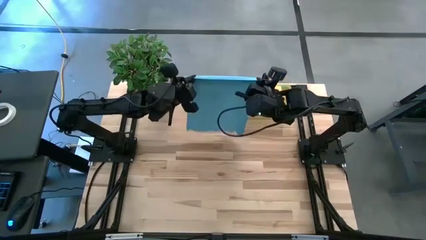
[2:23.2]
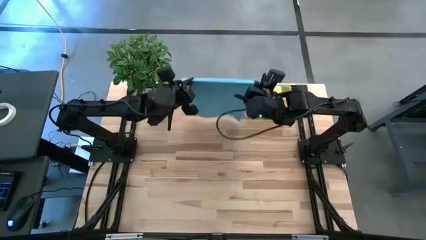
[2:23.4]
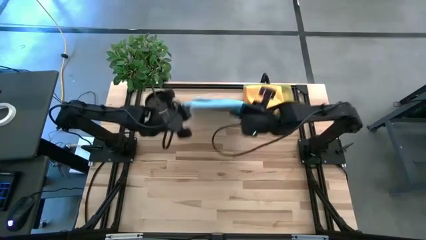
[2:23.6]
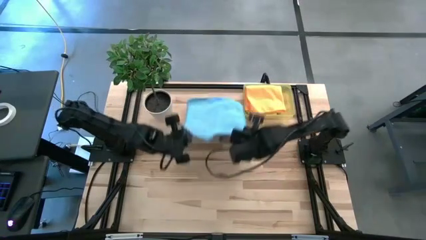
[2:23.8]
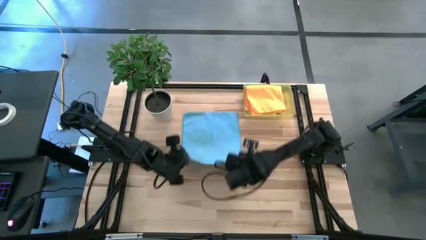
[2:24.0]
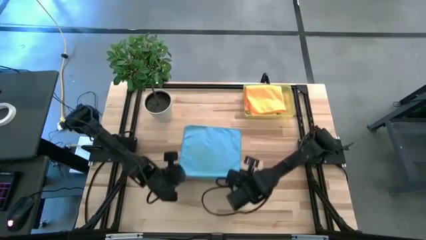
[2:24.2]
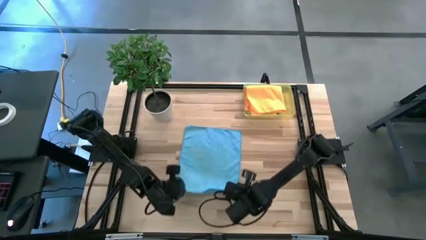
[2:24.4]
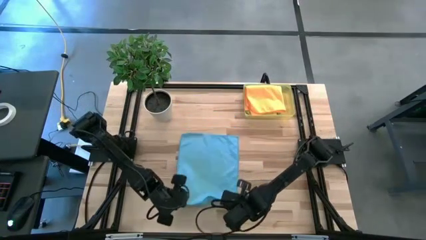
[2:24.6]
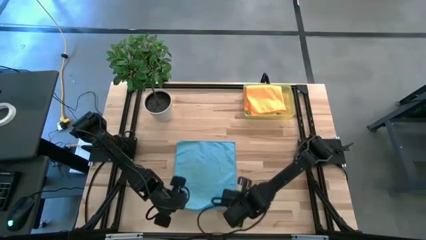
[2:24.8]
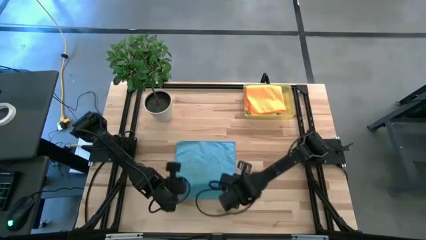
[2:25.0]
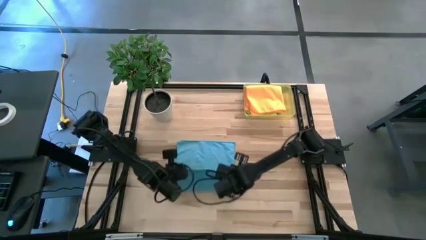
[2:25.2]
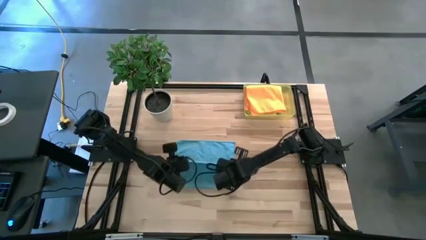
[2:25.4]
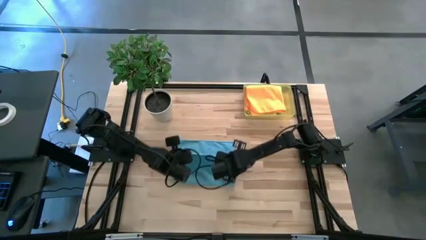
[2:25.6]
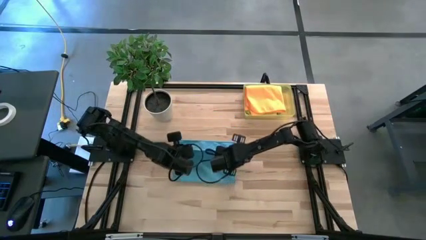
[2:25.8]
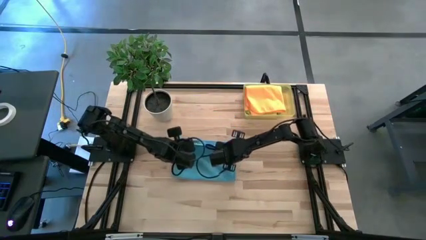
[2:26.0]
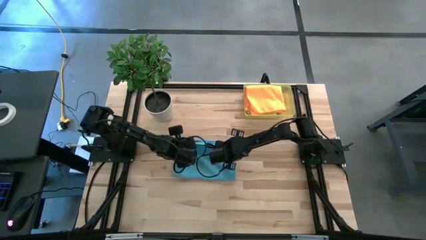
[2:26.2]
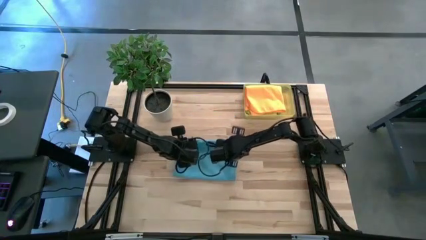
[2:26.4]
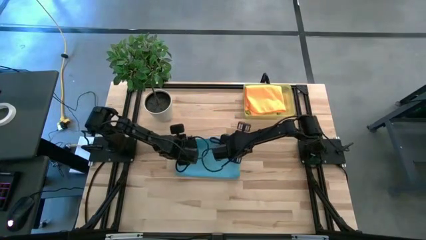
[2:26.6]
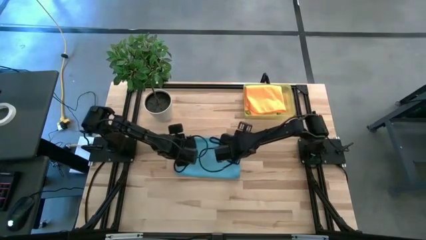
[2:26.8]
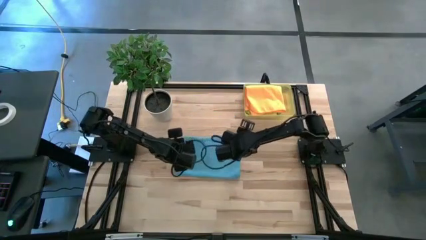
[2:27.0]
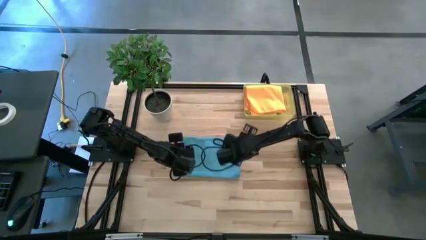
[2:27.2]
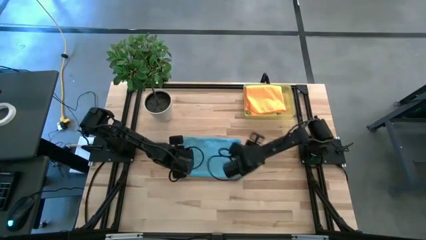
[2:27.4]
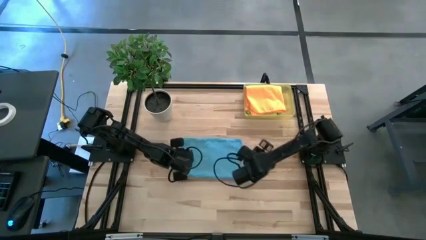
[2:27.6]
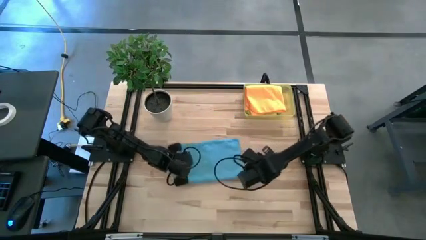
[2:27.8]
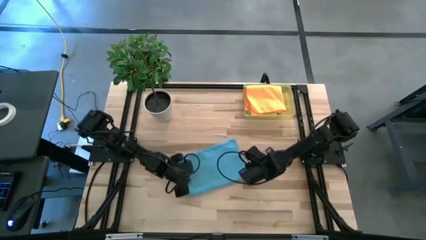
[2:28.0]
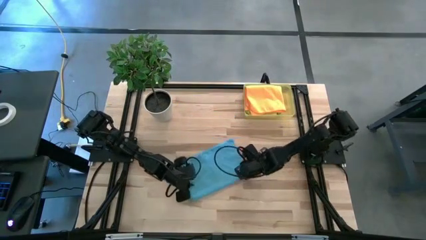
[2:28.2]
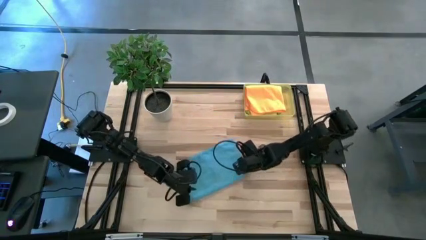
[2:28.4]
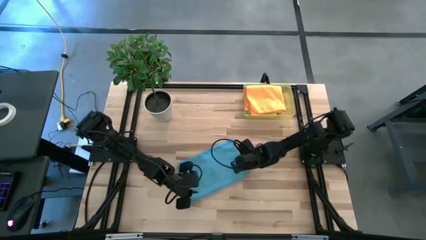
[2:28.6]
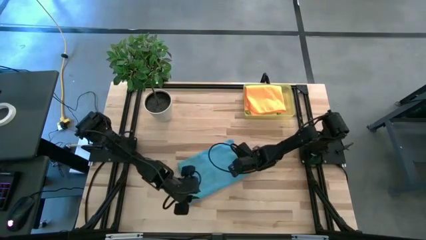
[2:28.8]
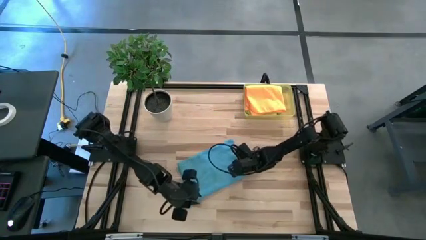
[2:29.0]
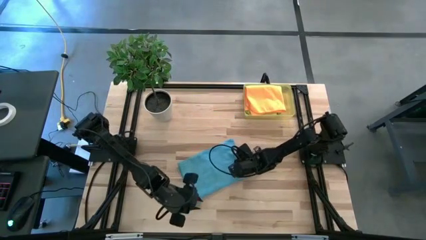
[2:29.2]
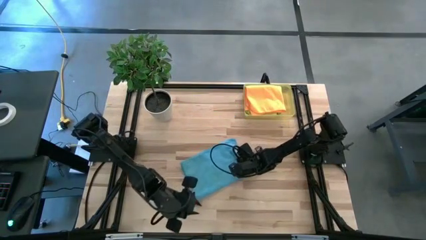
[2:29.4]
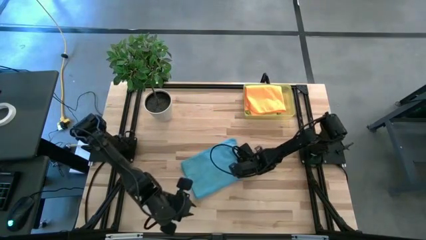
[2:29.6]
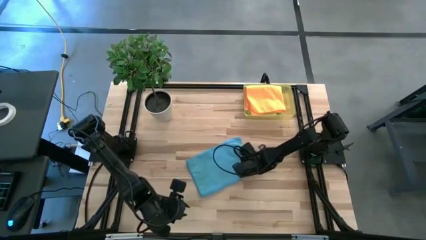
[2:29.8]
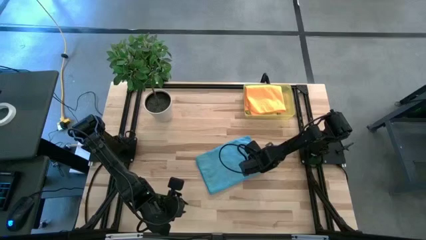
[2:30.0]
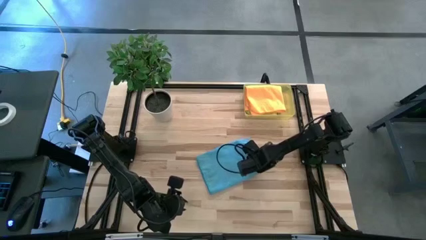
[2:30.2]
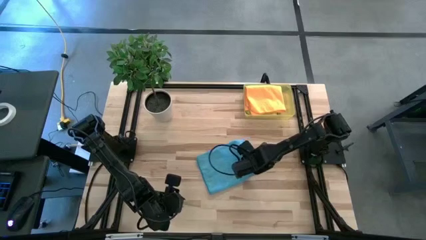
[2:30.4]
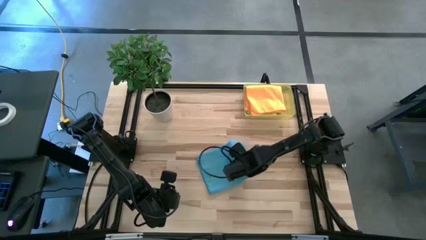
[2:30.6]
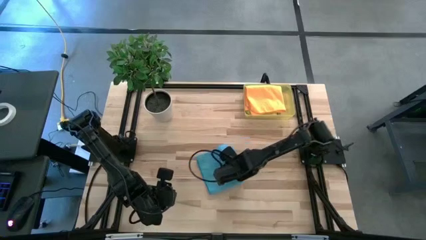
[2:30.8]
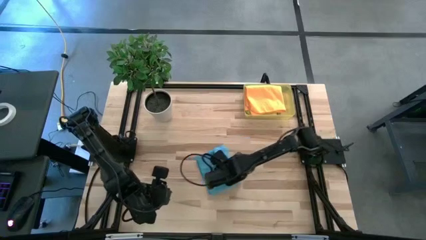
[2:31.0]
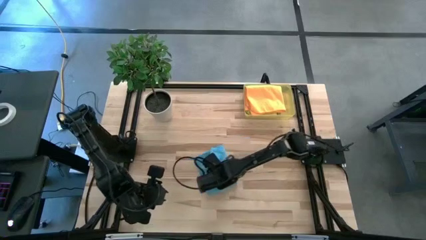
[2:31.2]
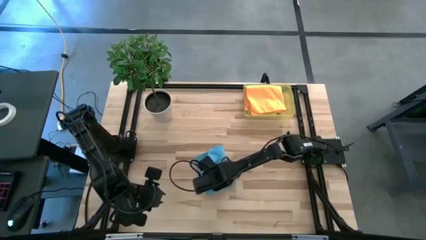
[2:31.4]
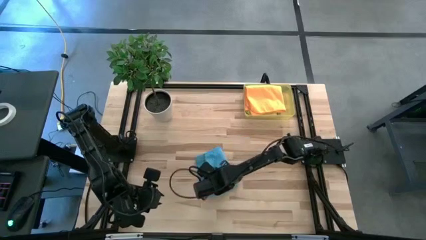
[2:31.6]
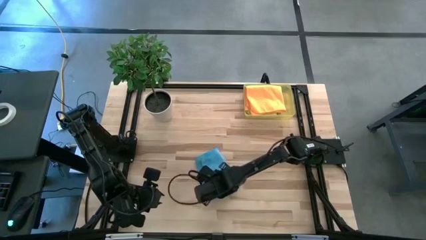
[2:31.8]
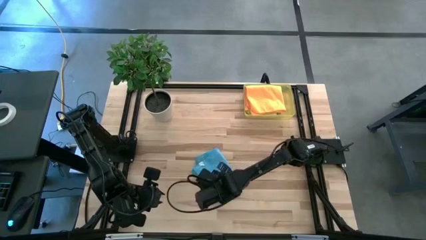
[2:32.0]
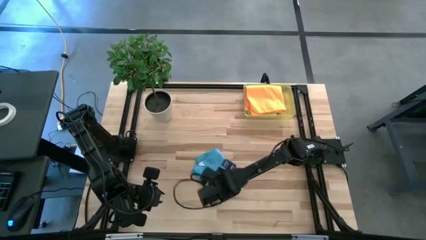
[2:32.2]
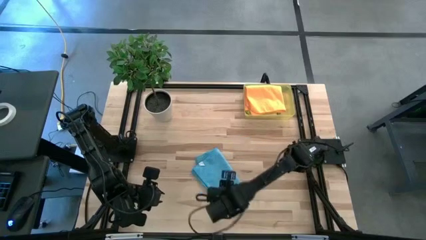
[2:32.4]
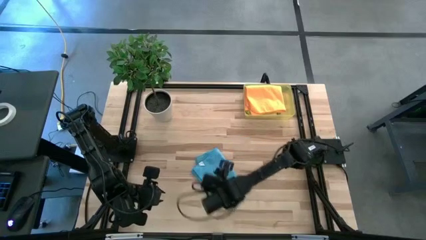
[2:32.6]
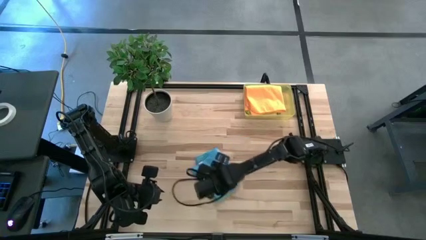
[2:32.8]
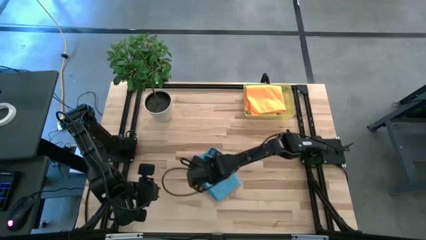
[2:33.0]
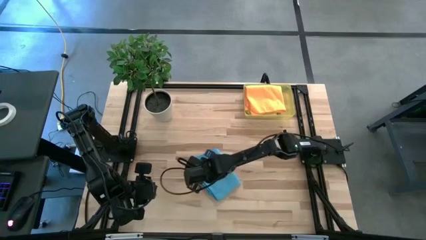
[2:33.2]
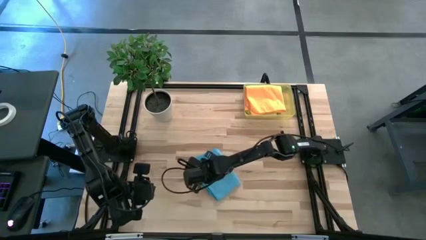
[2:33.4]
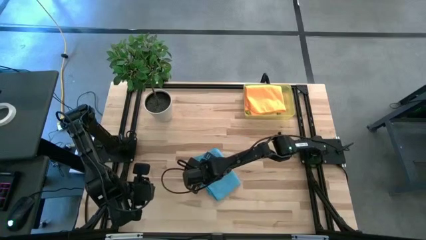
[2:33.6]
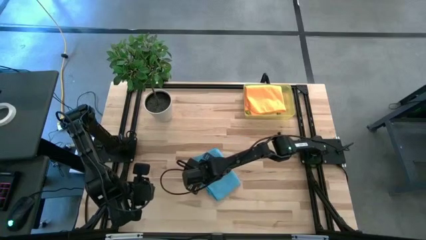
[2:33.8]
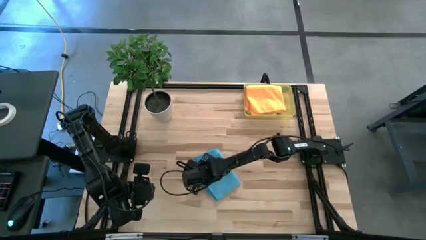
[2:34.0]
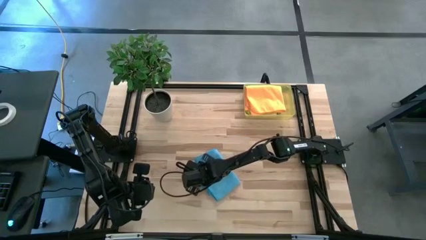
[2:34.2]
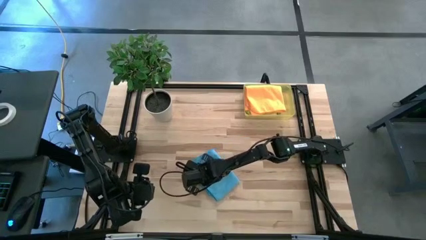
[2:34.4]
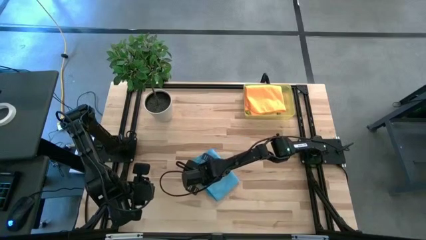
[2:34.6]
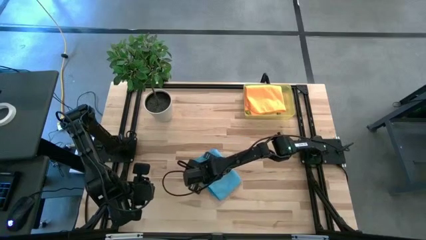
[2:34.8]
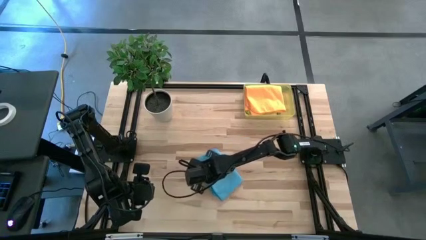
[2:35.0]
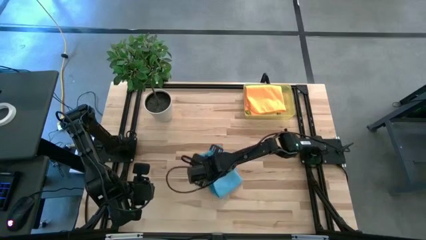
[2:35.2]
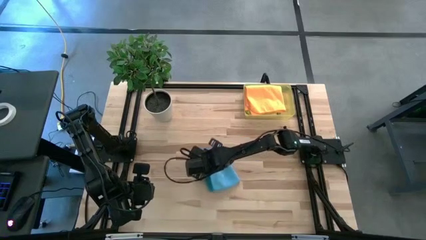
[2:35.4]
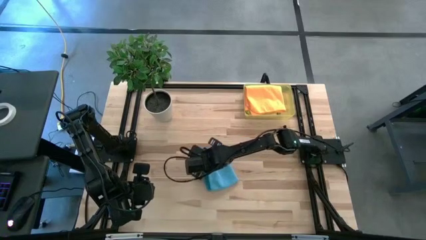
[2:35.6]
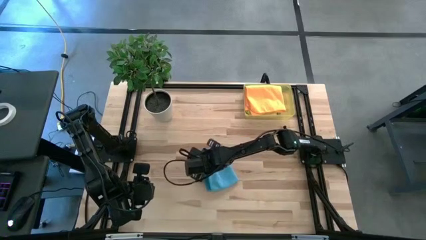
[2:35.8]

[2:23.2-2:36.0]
Task: Fold microfiber towels
Fold the blue microfiber towel

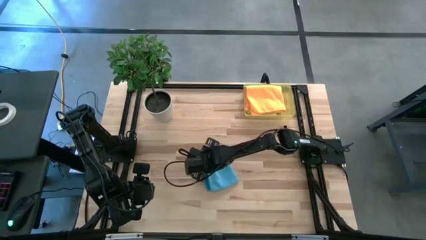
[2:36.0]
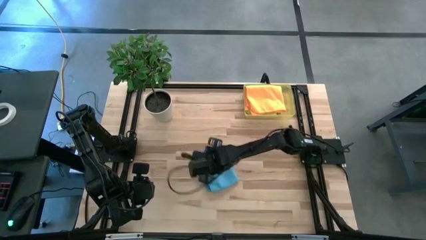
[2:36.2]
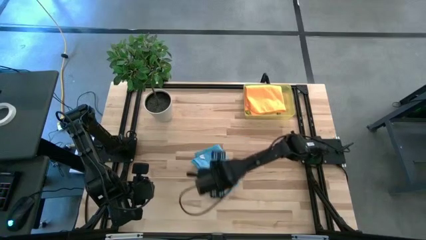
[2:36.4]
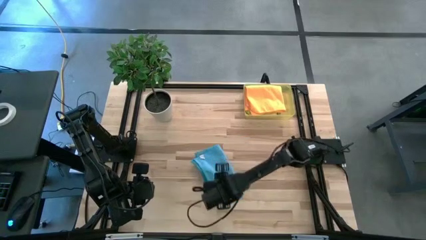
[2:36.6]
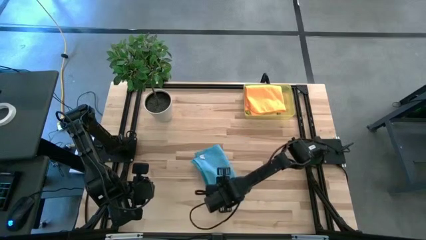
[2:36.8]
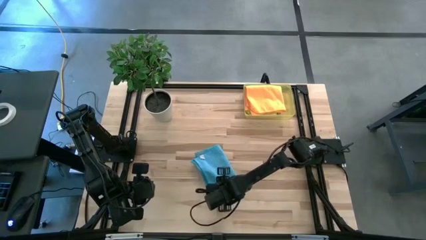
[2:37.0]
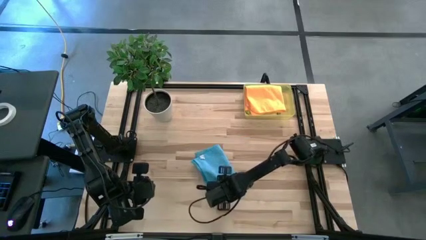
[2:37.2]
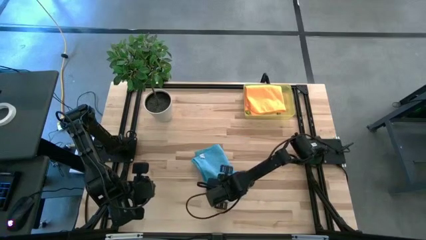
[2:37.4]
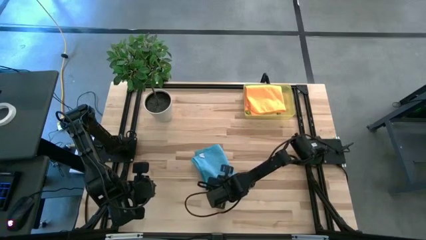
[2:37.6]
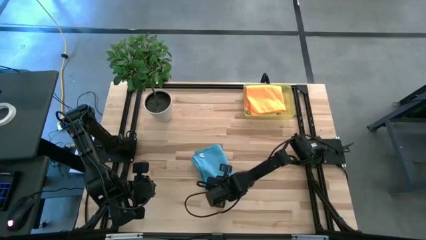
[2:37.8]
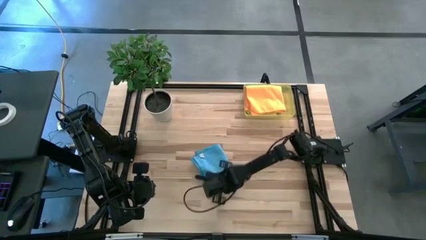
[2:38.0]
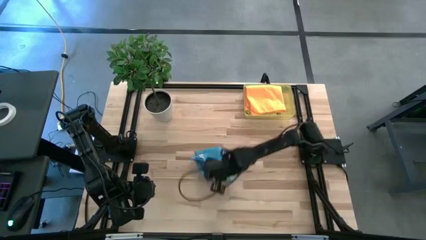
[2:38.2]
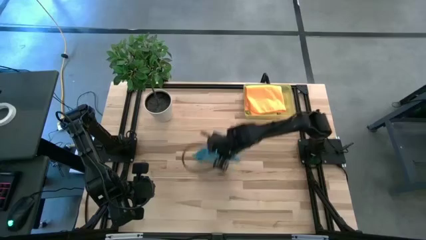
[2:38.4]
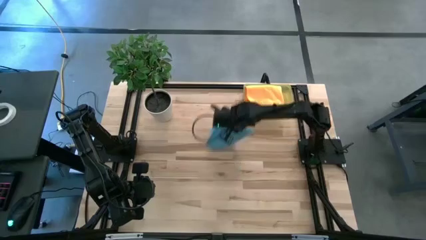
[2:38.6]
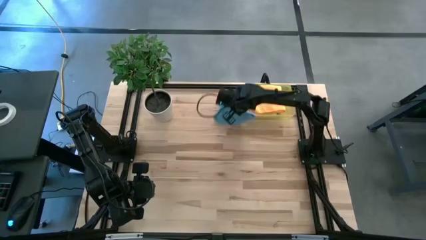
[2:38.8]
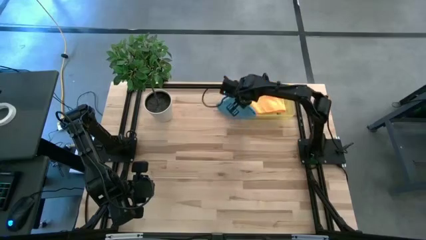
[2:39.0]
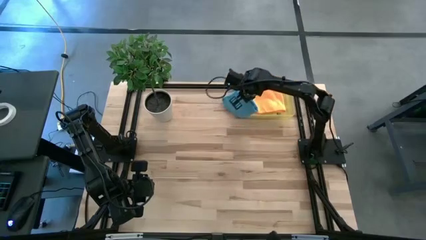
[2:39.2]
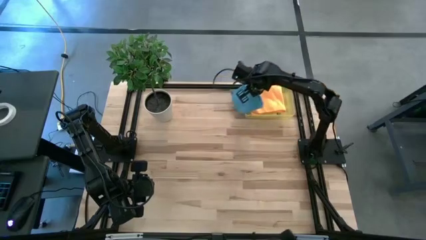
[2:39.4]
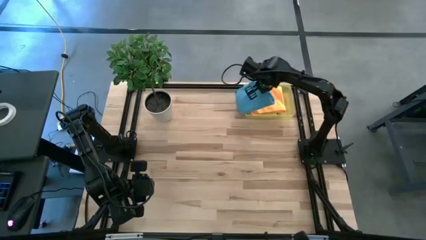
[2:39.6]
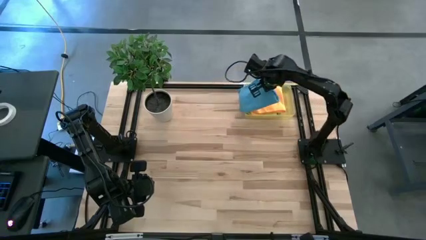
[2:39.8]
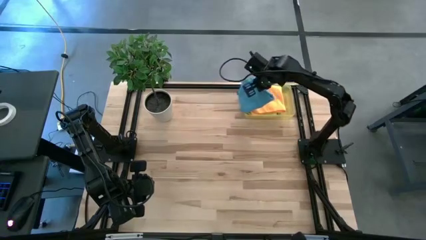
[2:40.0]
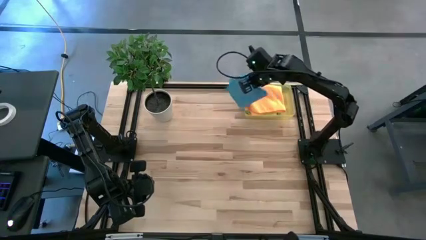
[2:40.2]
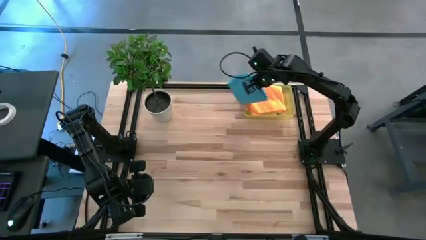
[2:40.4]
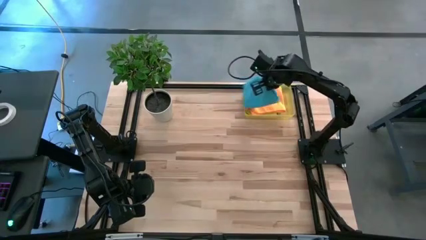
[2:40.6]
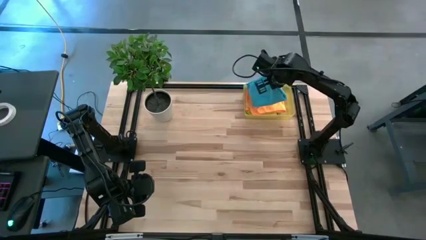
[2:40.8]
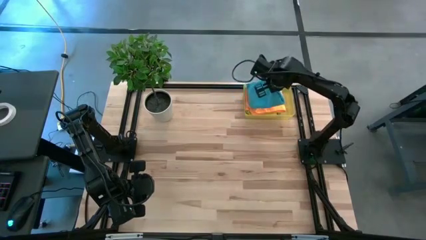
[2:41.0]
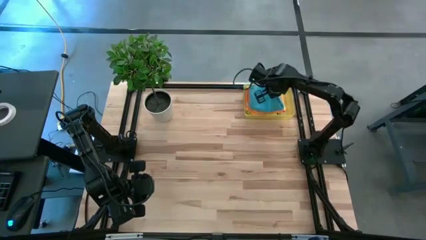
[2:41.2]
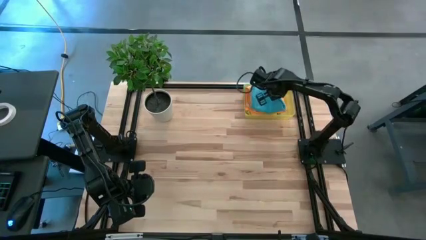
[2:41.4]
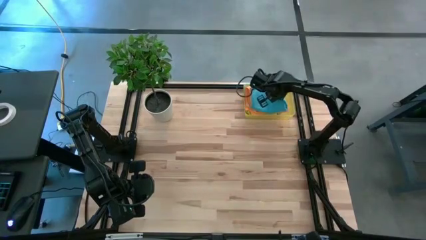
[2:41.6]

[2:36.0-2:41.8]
Put the blue microfiber towel into the yellow bin
